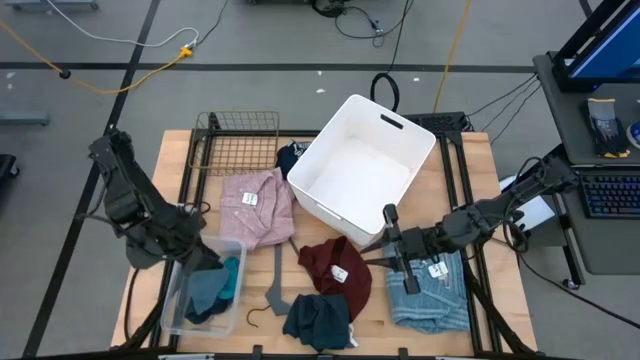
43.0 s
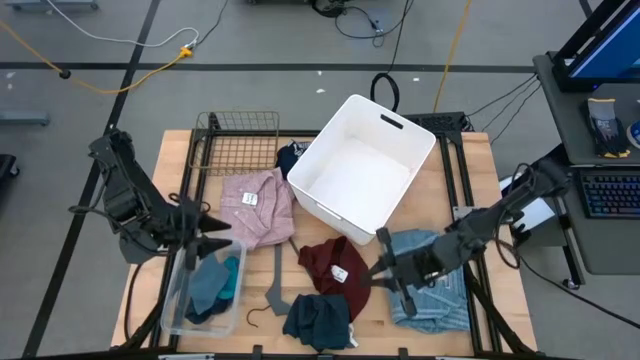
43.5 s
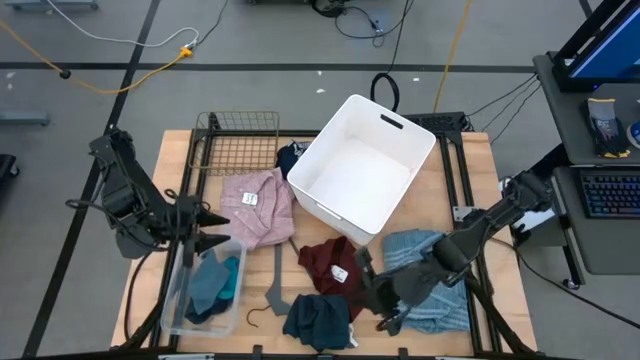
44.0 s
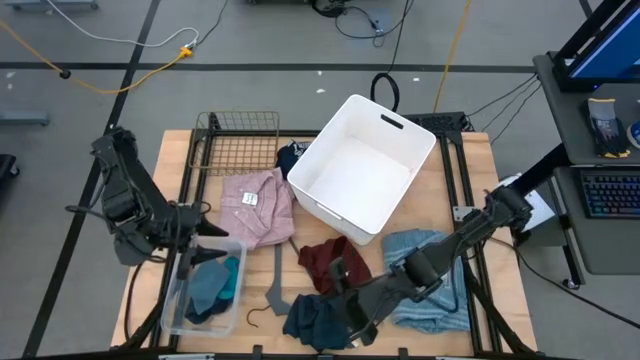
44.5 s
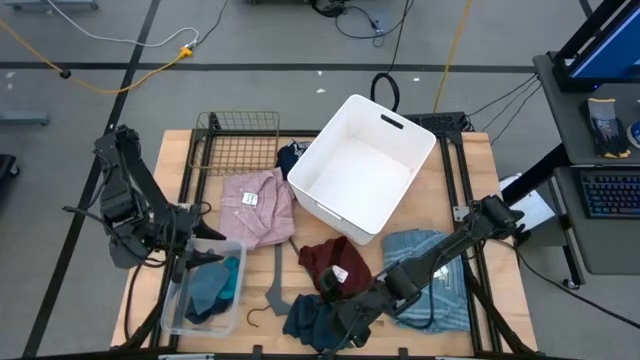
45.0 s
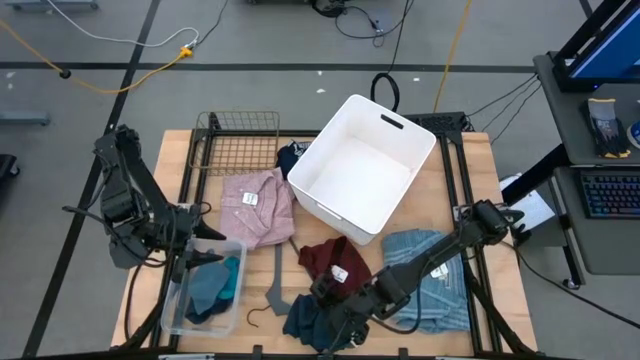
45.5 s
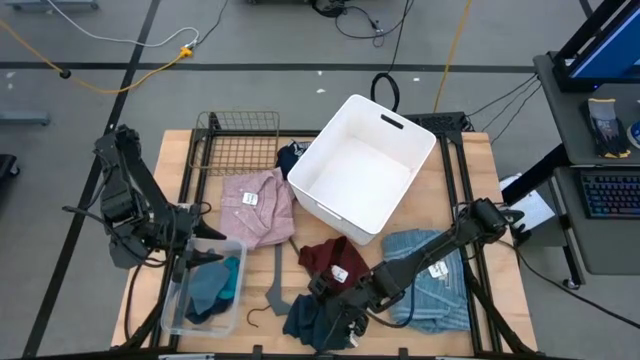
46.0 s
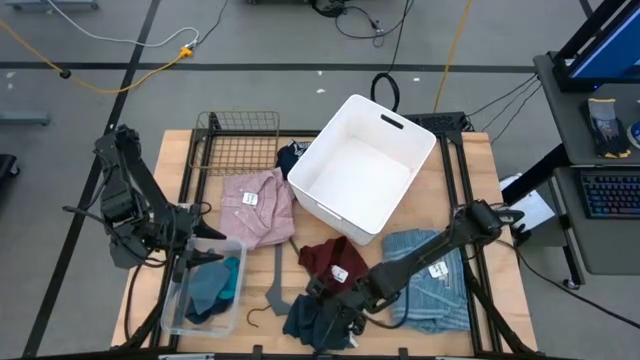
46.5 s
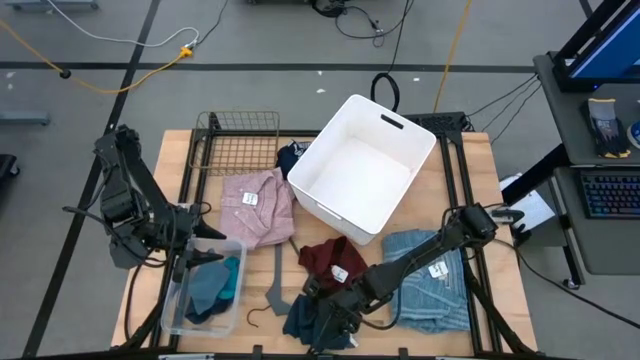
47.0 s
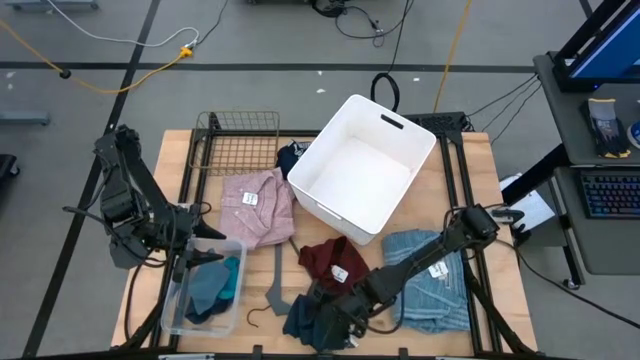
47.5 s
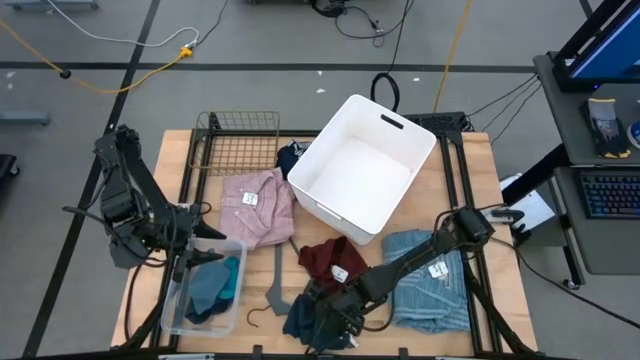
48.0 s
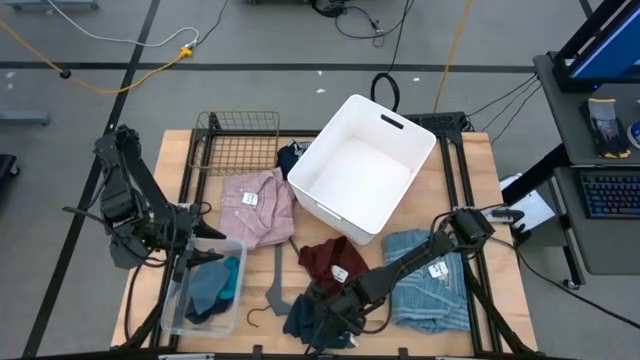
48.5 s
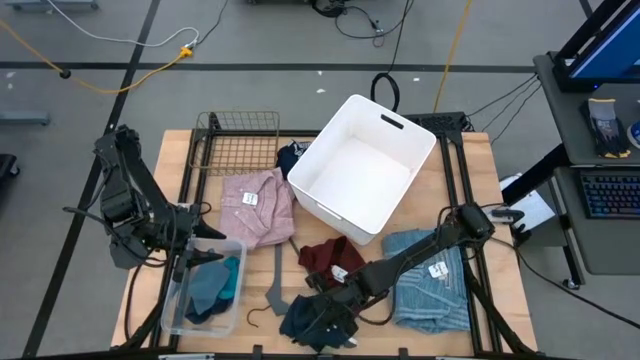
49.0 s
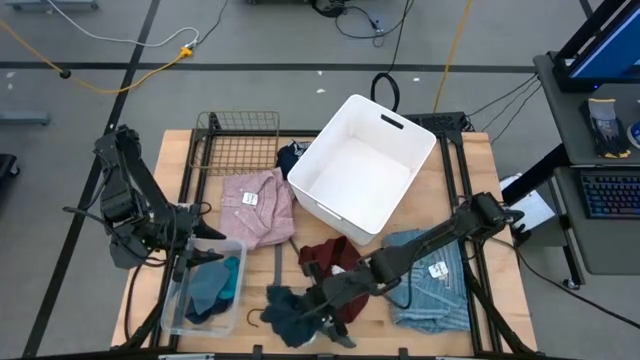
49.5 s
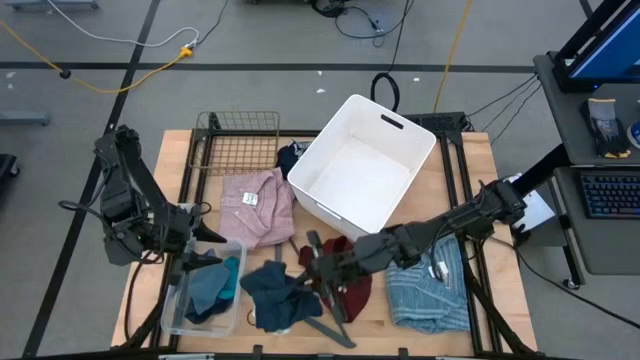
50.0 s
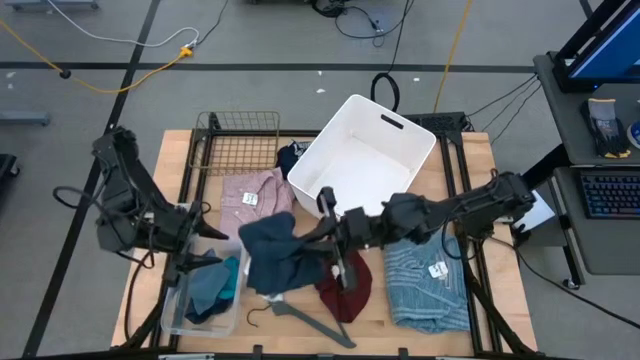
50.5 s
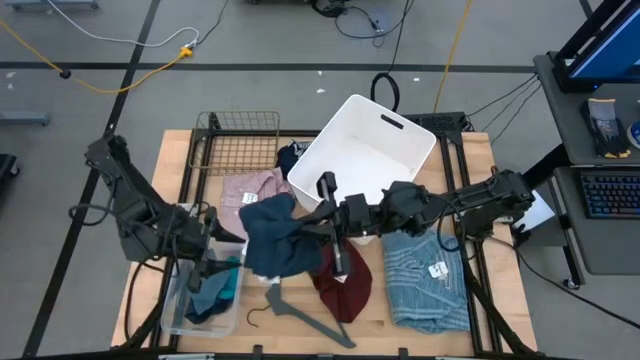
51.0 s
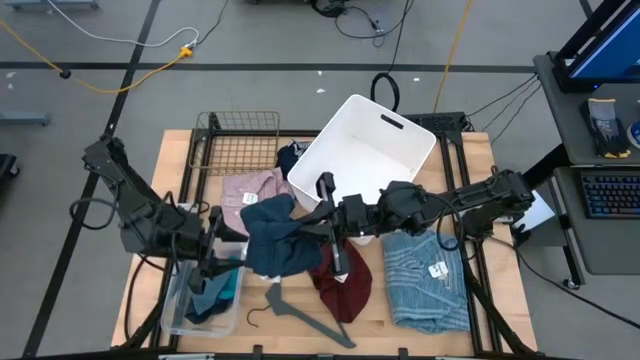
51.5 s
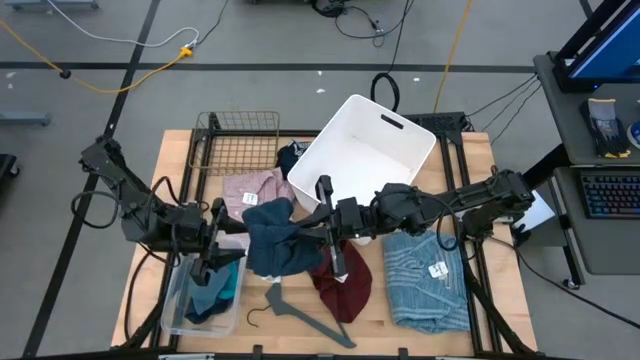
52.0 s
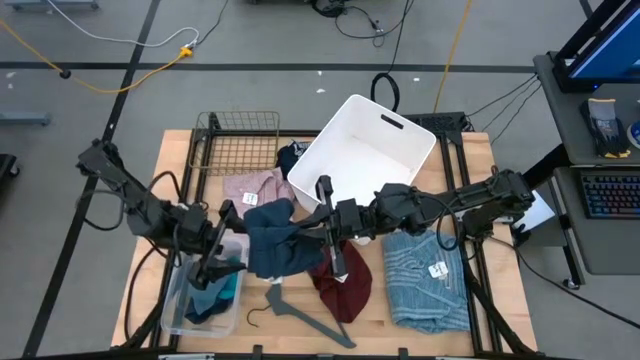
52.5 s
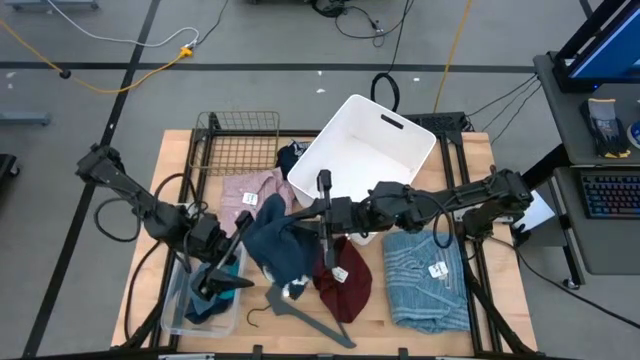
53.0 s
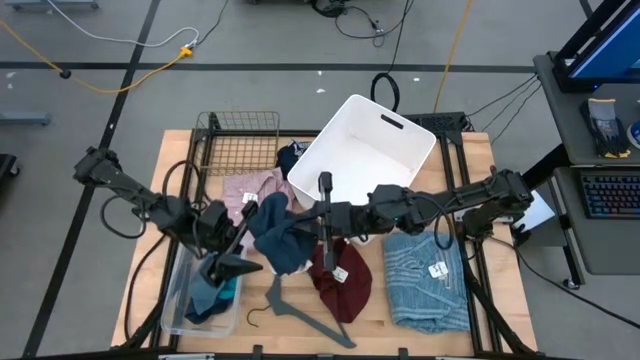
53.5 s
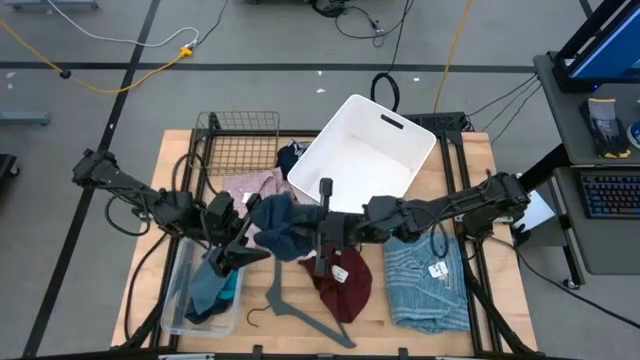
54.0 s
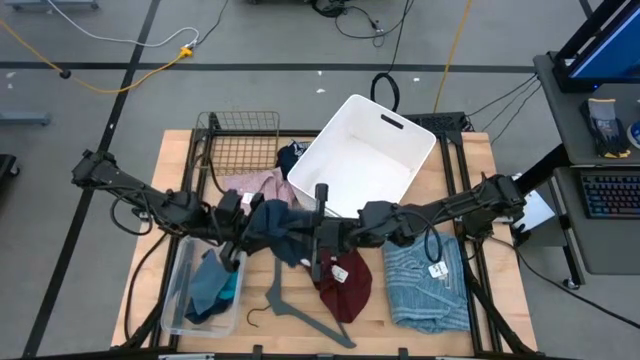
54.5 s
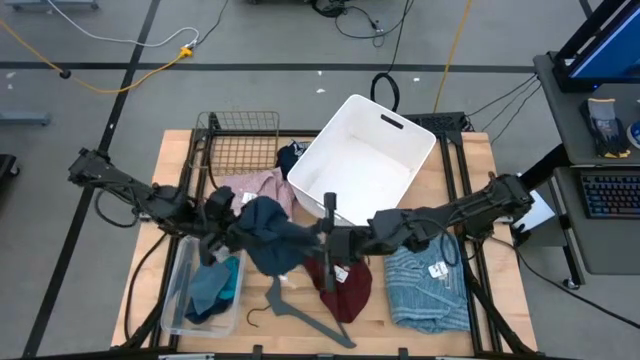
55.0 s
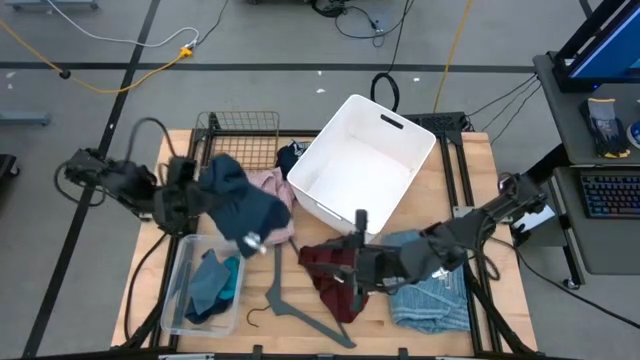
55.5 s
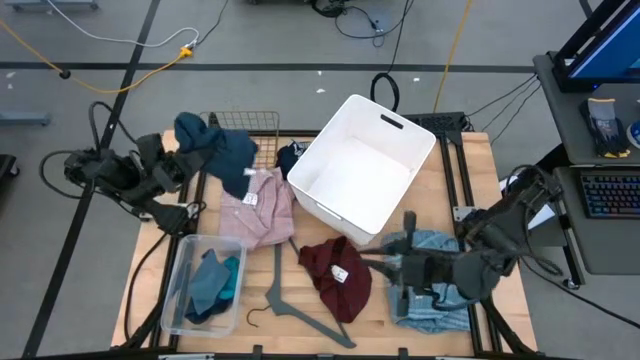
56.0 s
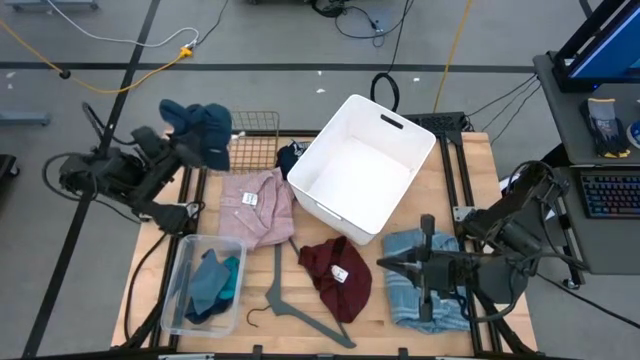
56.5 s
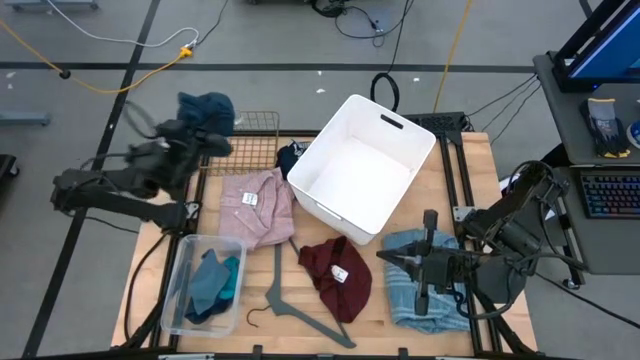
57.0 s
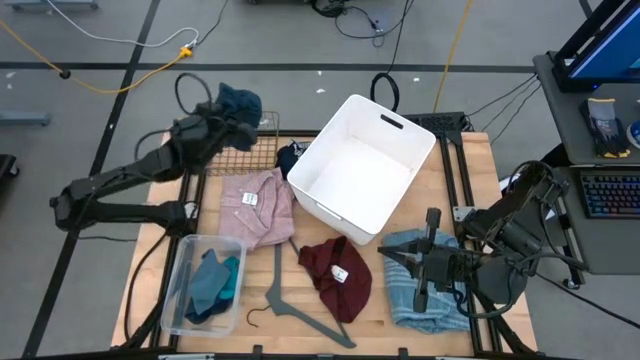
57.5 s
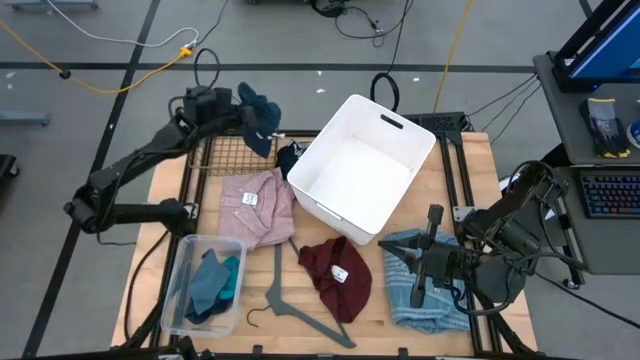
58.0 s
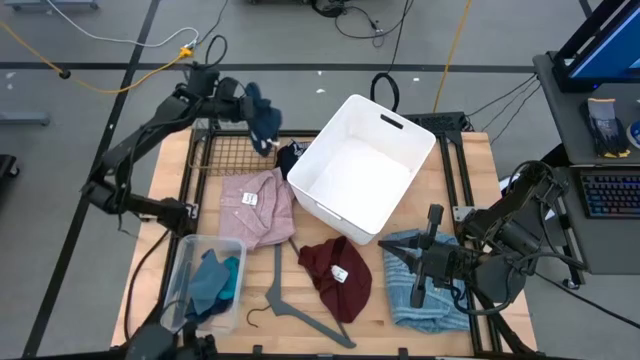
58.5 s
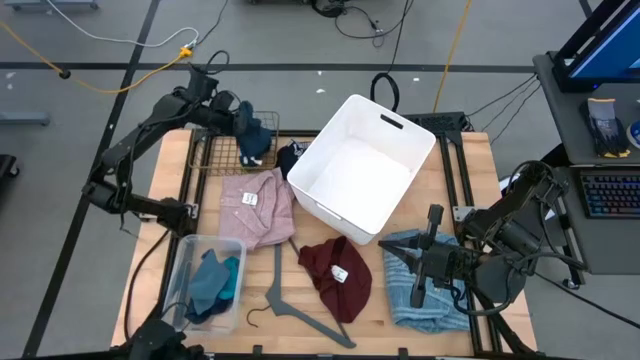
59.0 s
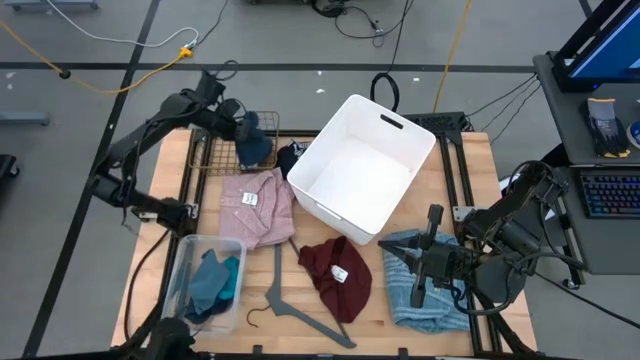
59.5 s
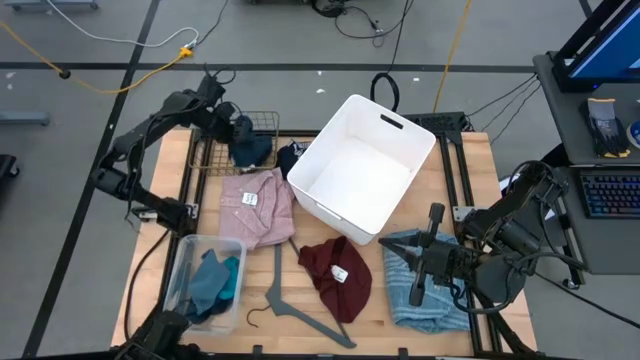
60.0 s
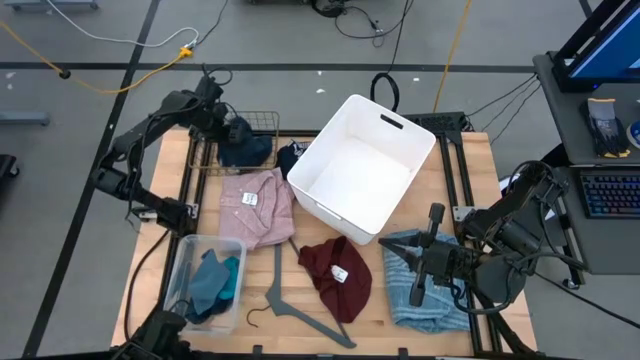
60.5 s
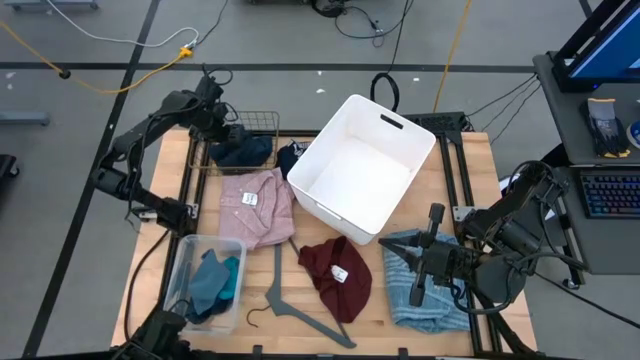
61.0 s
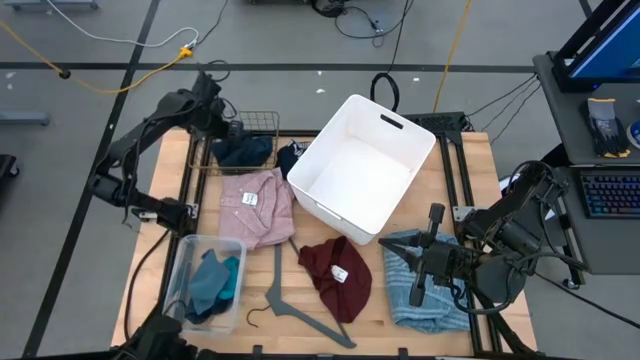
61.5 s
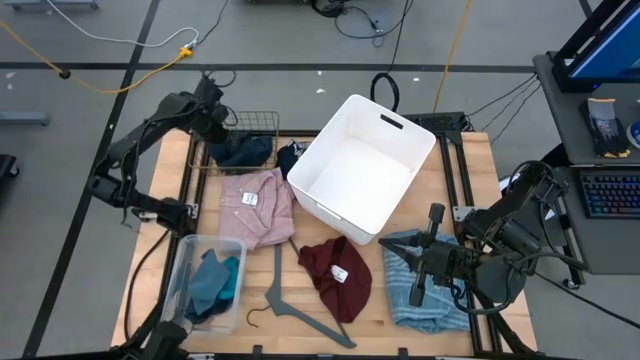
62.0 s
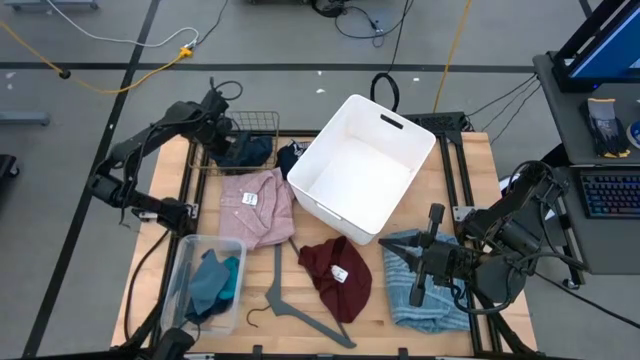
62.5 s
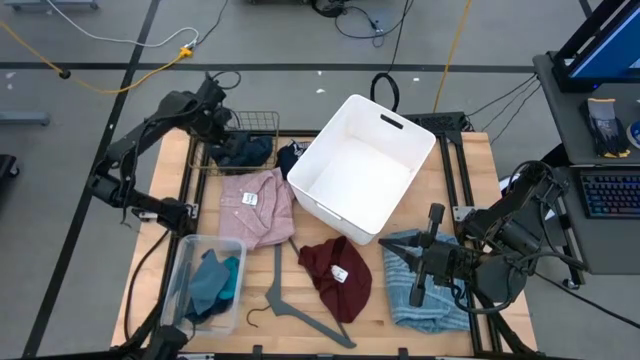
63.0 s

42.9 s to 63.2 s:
Task: Pick & Place Cloths
Put the blue shorts into the wire basket
